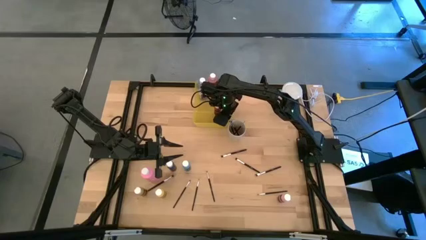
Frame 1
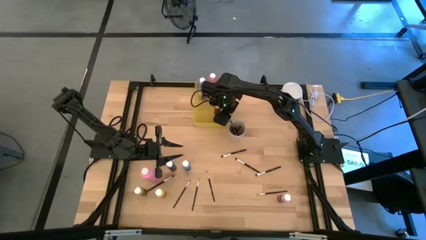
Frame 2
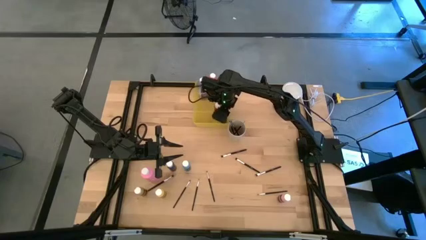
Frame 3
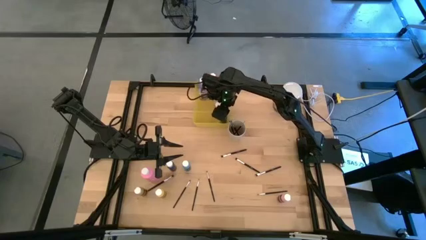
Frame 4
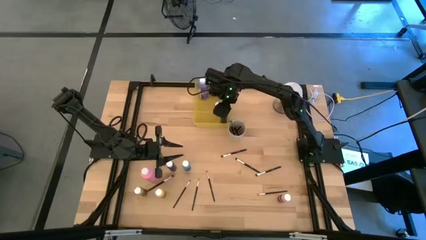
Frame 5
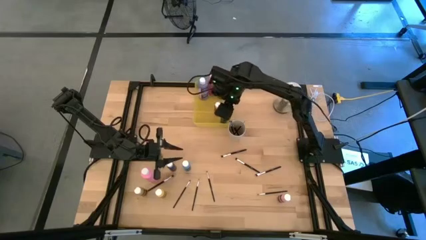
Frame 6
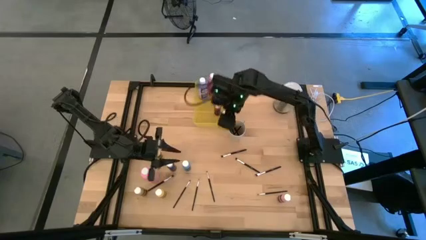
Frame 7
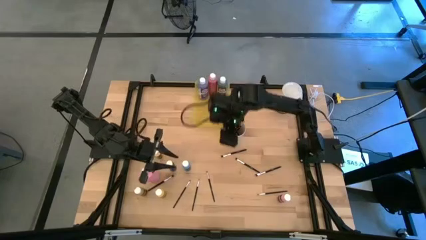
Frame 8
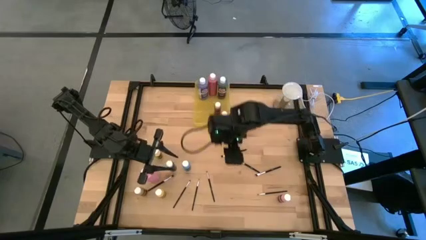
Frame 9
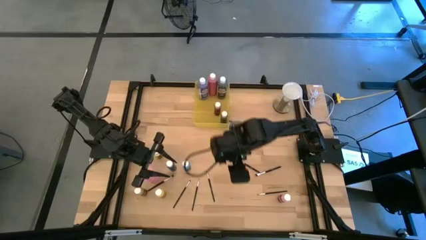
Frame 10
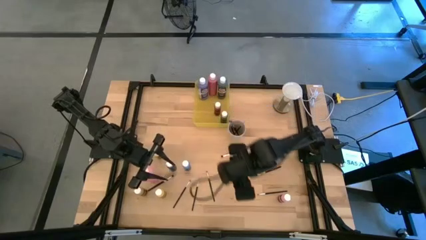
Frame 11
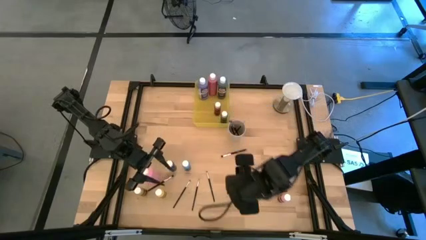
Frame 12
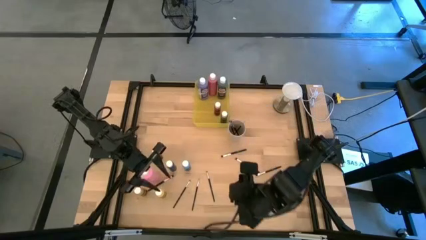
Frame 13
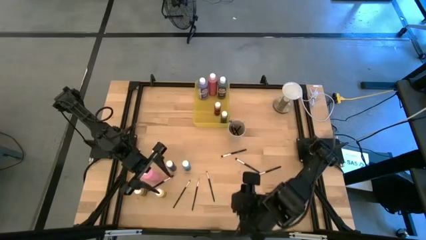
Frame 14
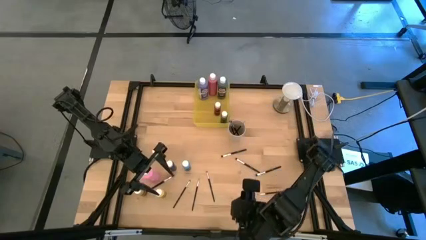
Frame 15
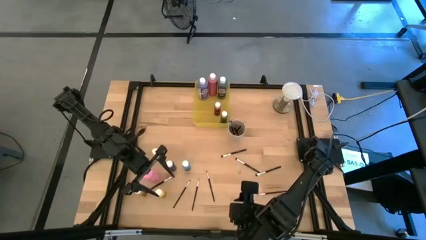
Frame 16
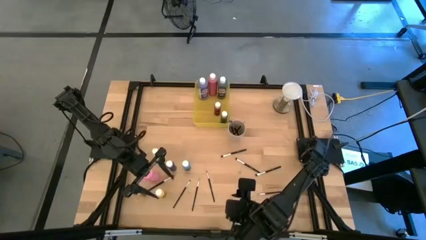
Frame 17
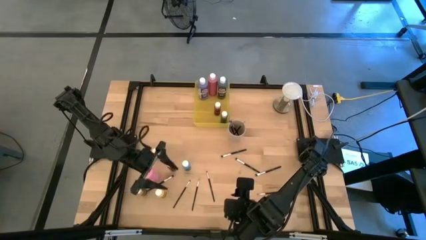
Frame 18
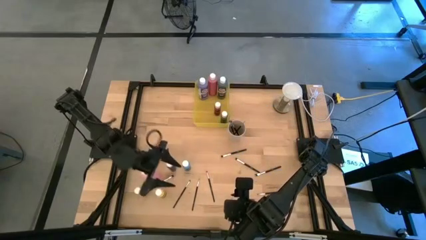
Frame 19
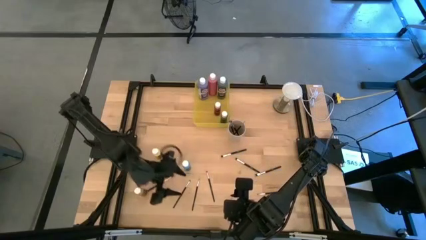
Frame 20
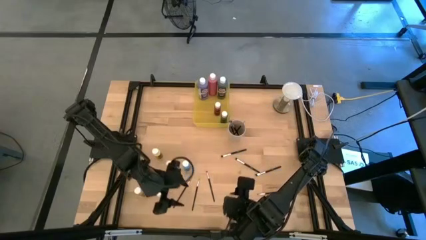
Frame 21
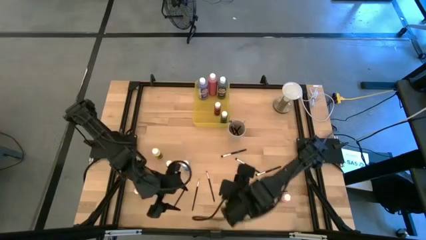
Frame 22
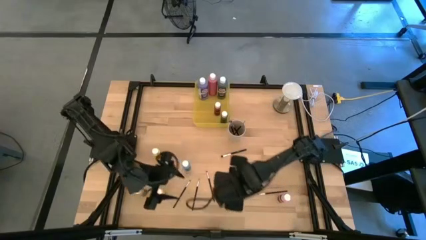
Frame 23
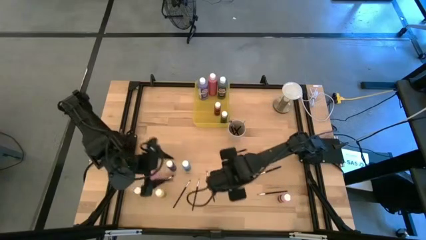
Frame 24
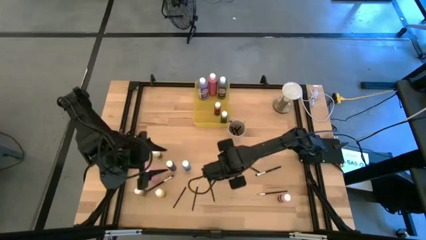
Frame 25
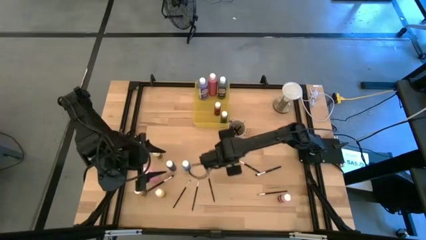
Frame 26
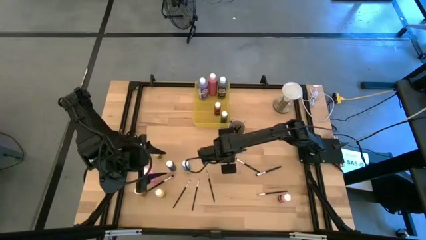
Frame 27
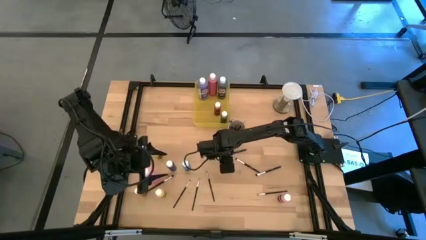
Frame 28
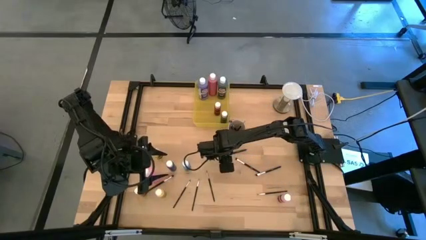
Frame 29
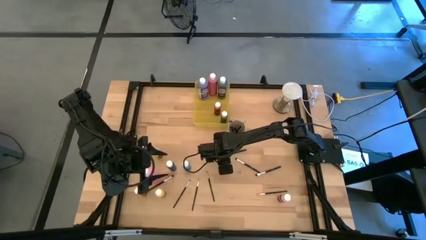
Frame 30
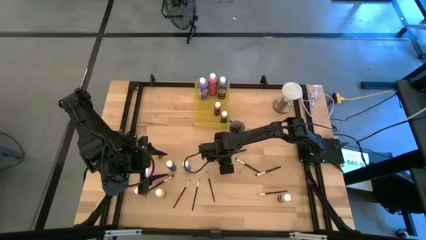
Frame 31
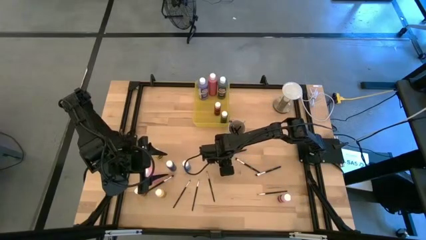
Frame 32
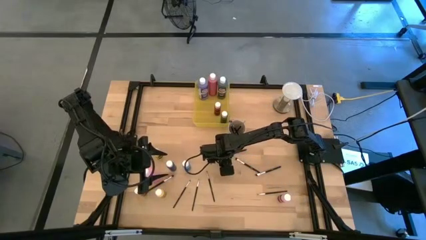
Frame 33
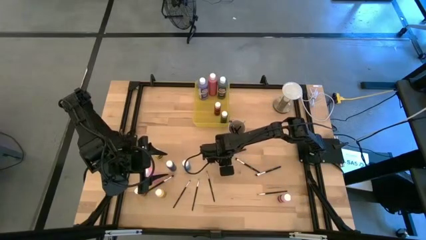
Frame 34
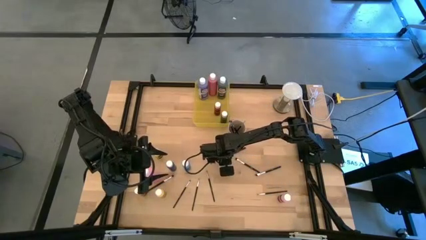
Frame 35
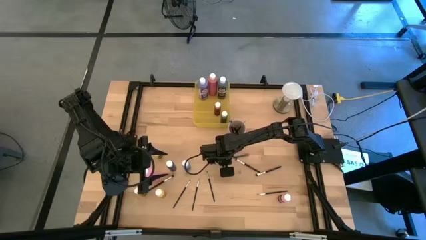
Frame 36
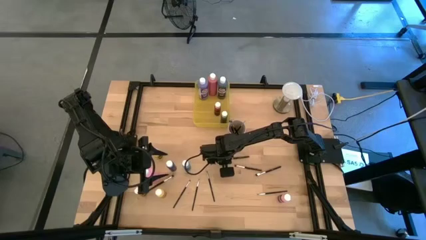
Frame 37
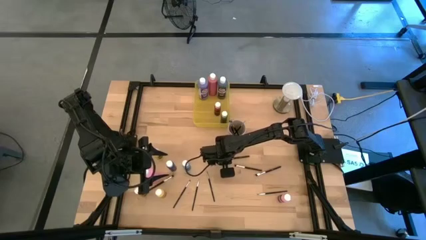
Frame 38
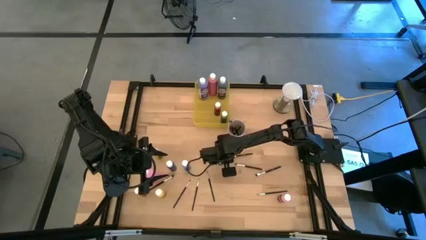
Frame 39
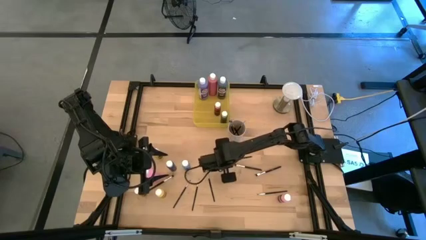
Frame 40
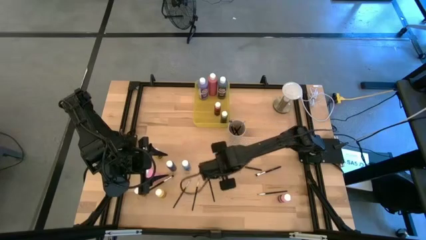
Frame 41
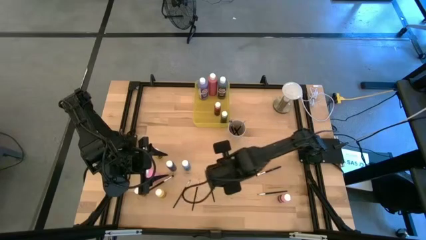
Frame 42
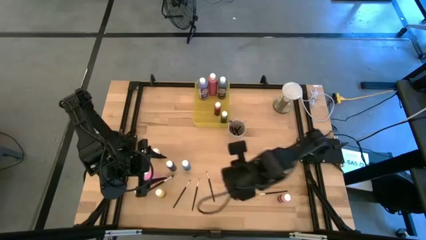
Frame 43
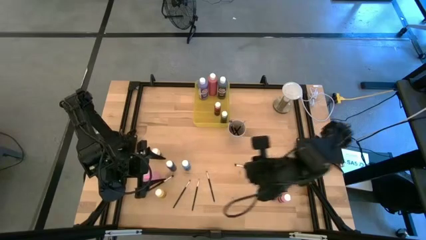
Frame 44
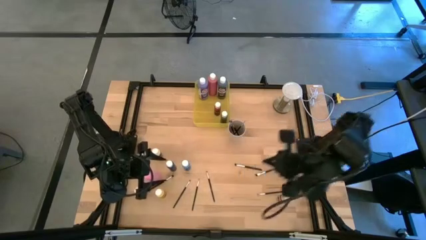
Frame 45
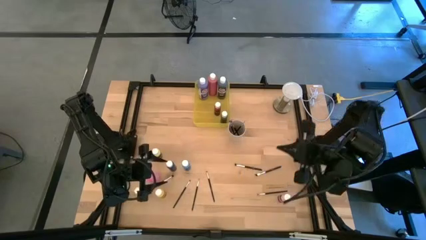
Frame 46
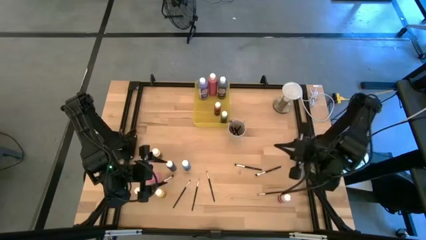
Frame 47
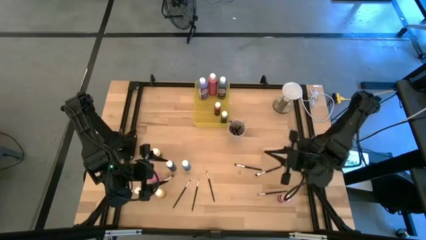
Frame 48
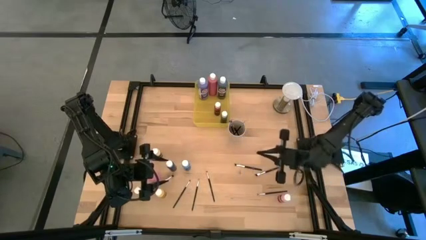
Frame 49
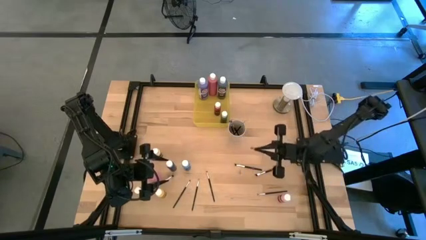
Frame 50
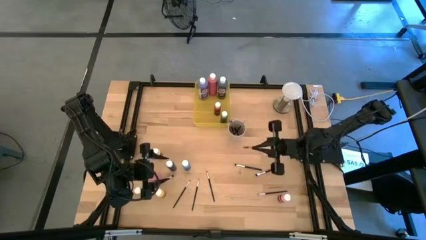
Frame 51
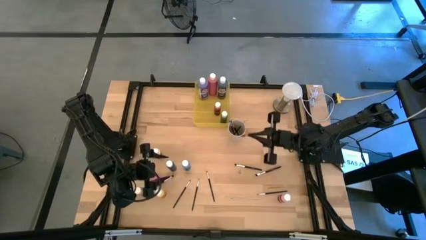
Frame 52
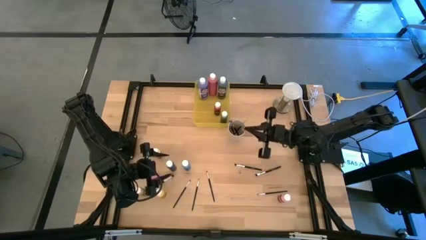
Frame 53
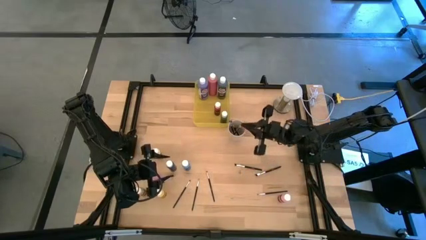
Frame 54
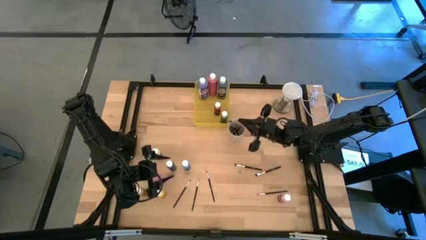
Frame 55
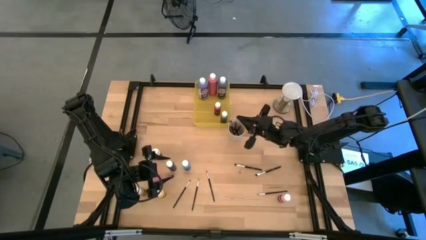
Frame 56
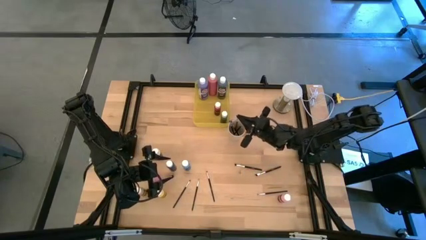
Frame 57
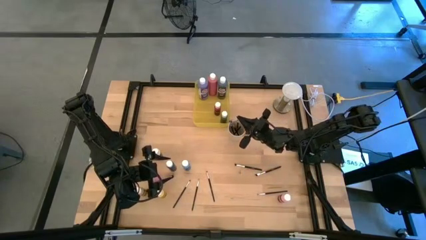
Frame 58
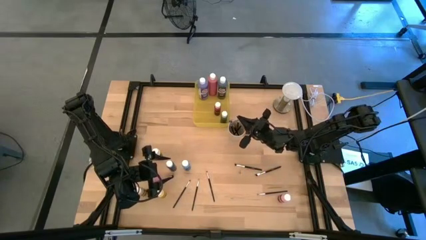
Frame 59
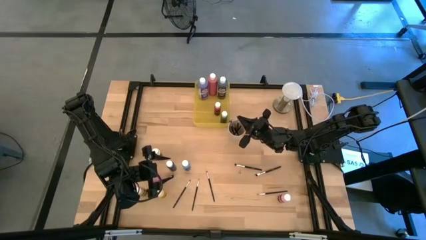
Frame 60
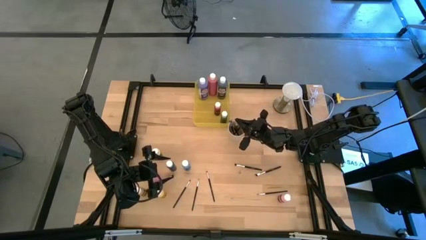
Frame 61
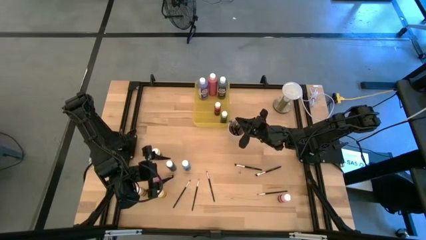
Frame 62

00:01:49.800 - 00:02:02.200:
Task: Pick & Place Paint Supplies
Put the black paintbrush into the white cup

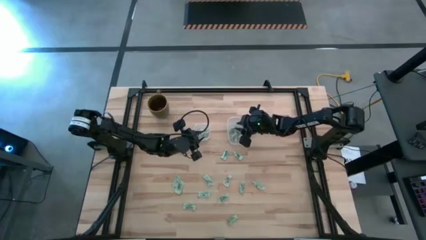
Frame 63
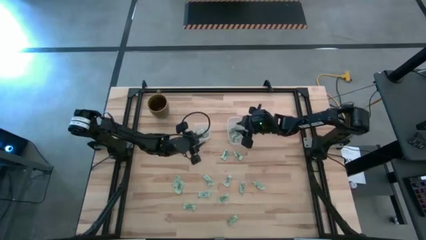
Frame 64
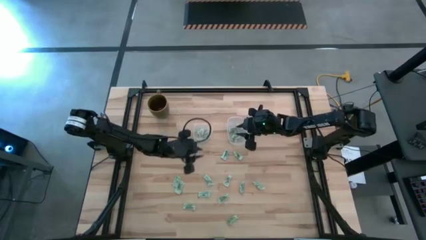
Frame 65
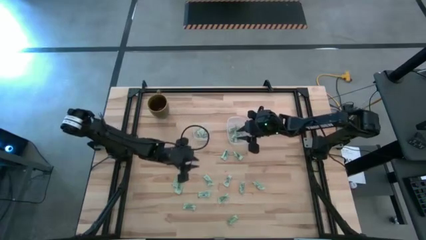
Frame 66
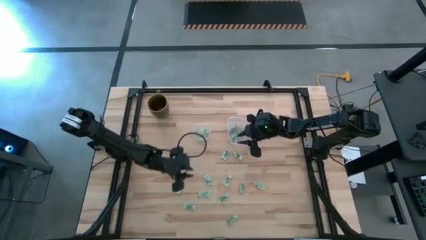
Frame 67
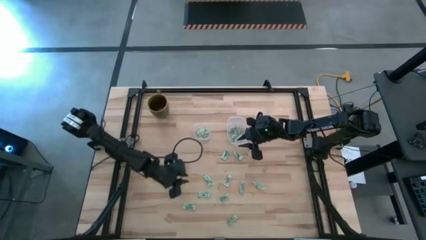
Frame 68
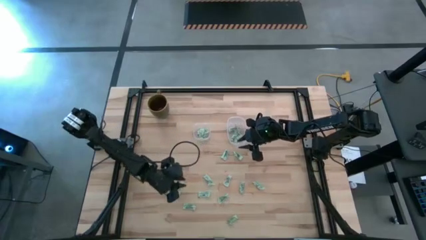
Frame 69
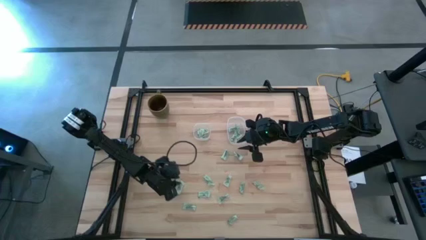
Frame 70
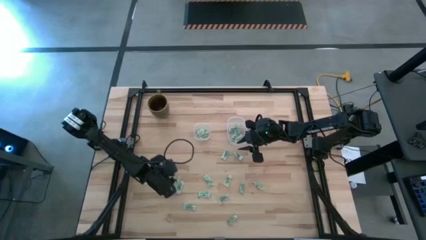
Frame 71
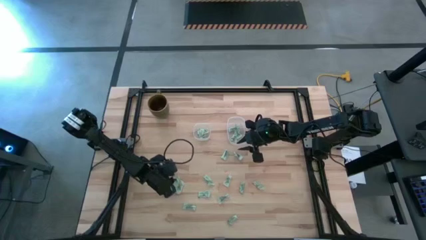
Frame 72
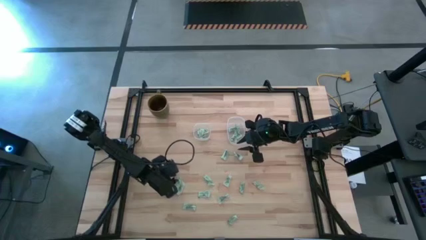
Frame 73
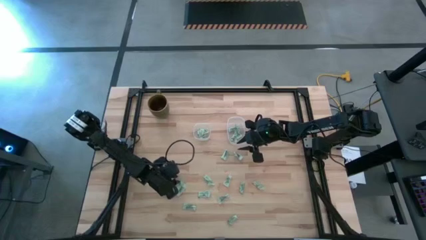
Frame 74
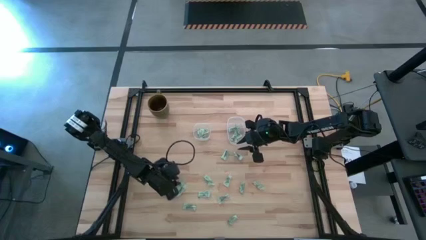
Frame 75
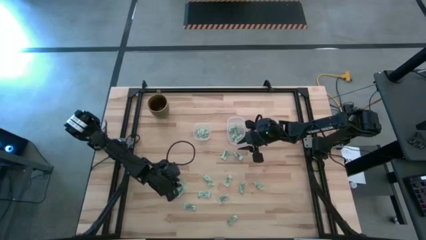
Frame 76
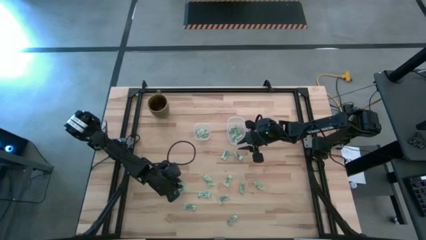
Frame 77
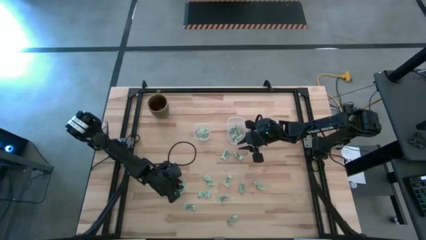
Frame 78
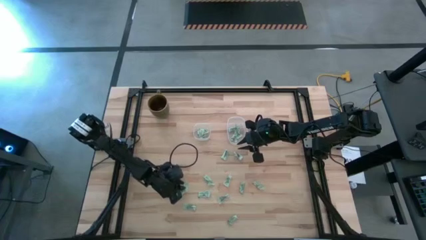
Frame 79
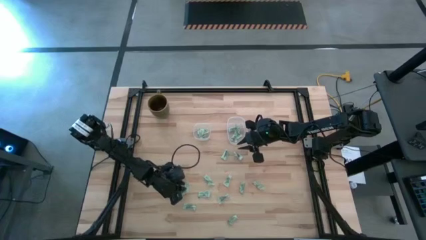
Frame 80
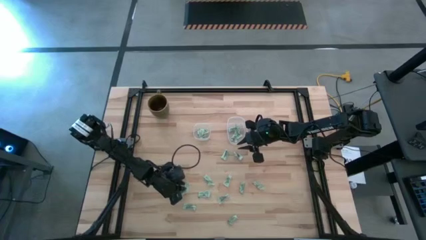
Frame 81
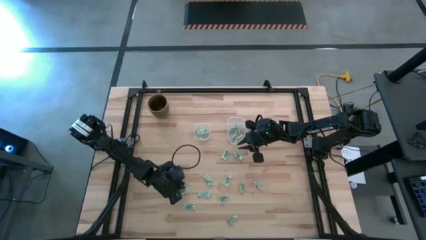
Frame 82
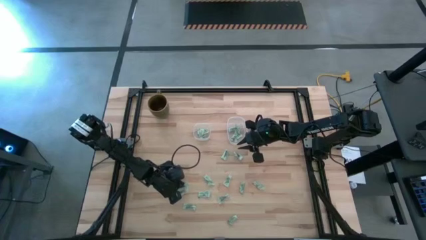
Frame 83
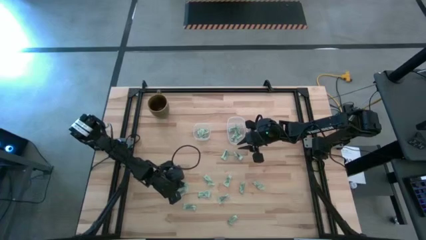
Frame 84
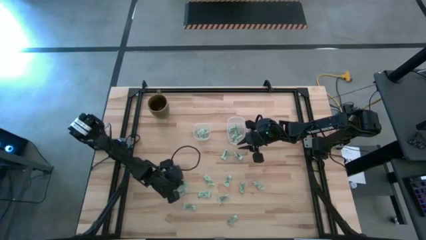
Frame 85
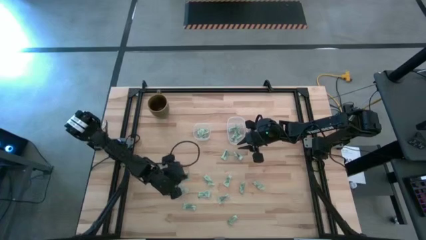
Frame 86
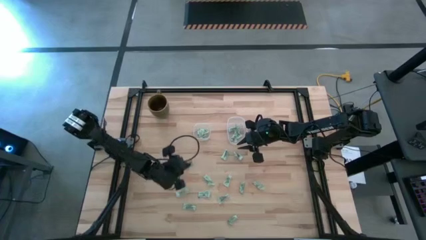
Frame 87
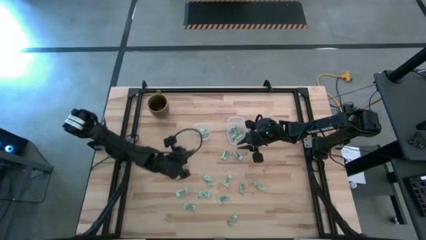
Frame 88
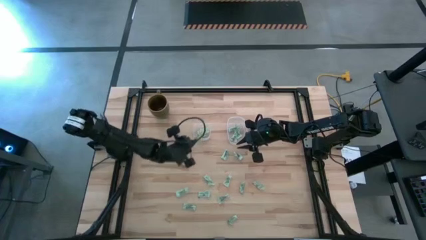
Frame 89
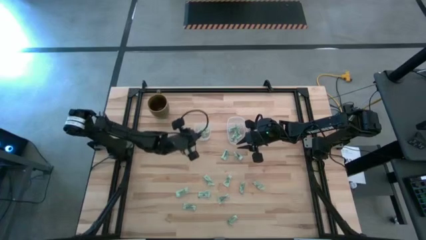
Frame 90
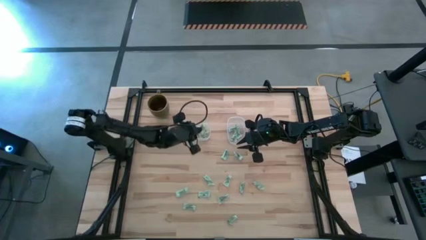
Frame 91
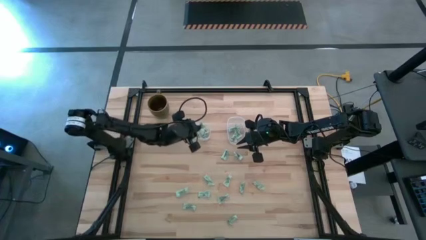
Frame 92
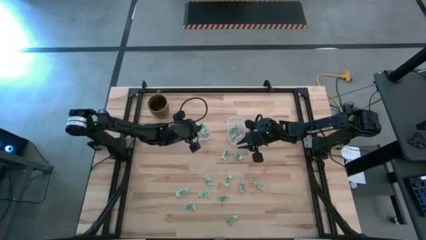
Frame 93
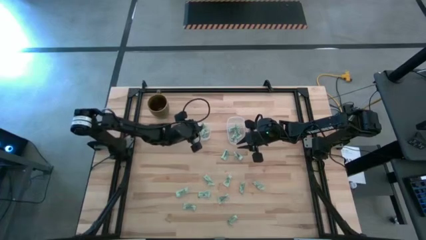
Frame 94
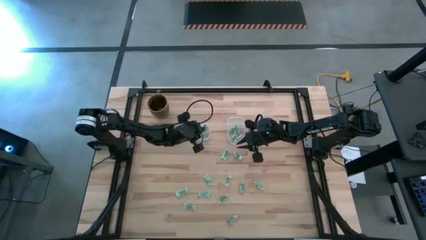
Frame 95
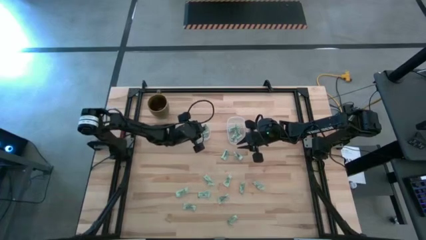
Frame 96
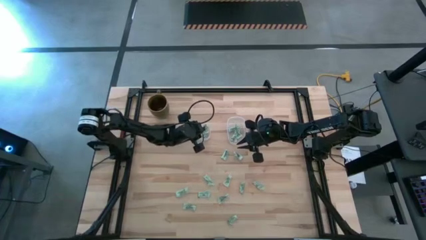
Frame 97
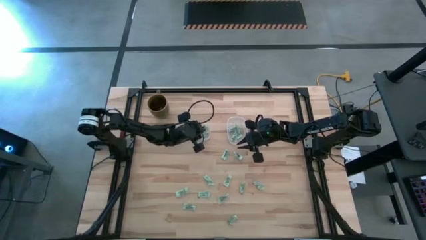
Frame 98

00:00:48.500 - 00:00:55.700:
Task: Pick and place items into bin
Put the light green stevia packet into the left transparent bin
